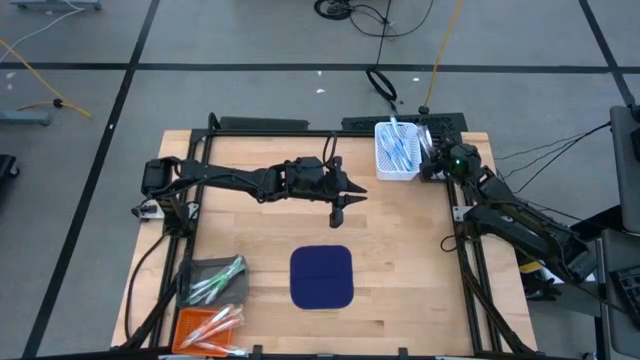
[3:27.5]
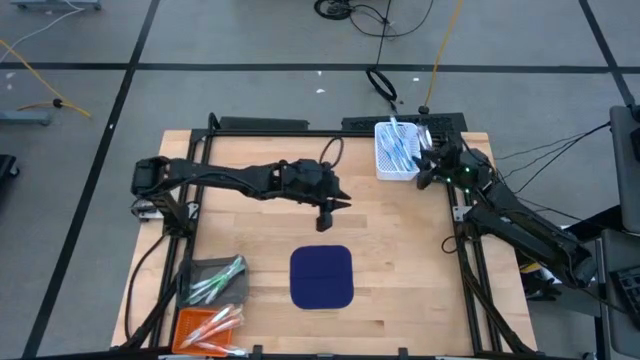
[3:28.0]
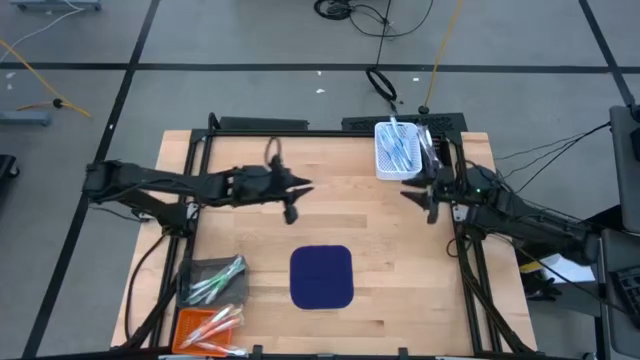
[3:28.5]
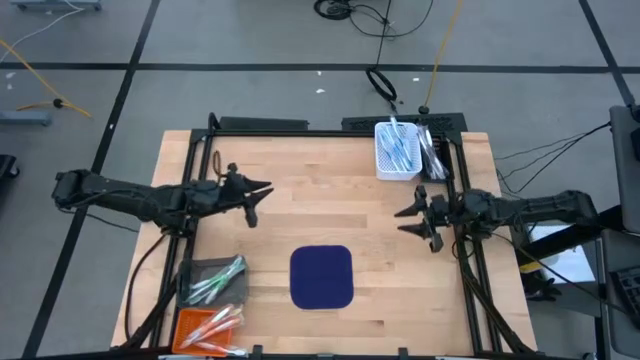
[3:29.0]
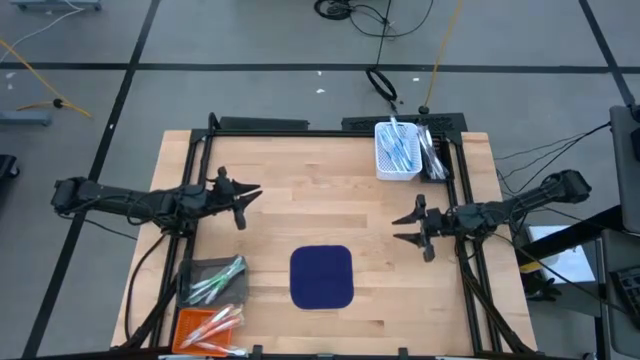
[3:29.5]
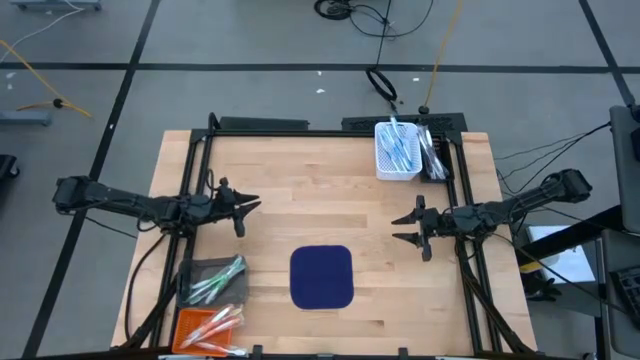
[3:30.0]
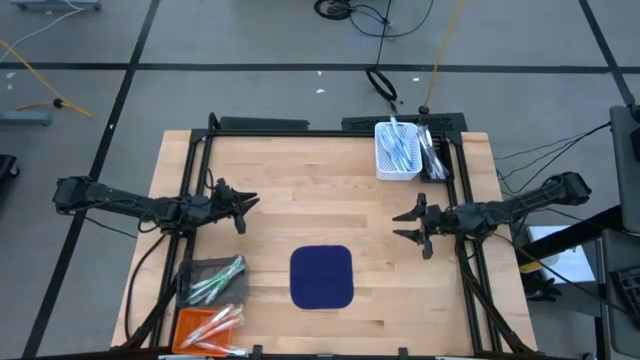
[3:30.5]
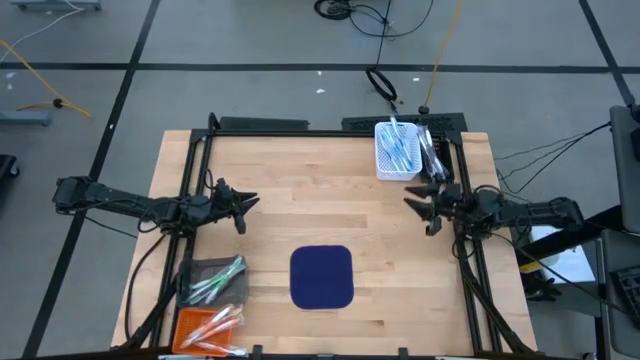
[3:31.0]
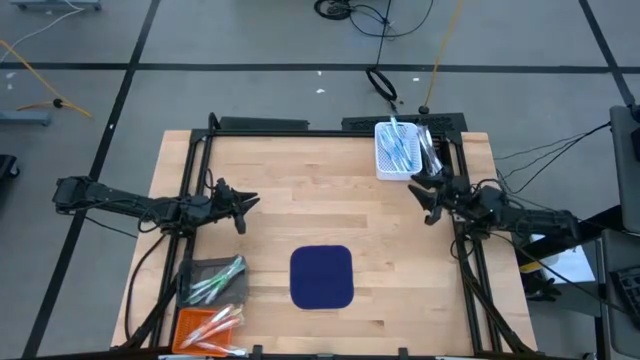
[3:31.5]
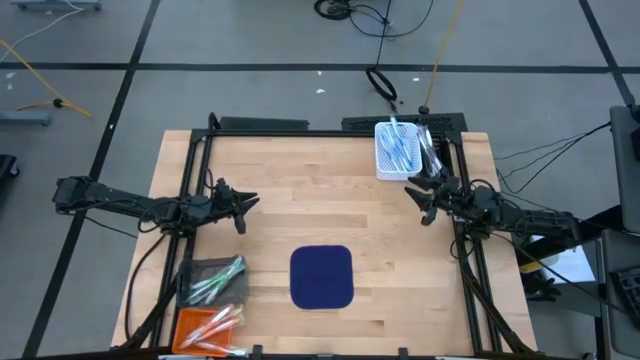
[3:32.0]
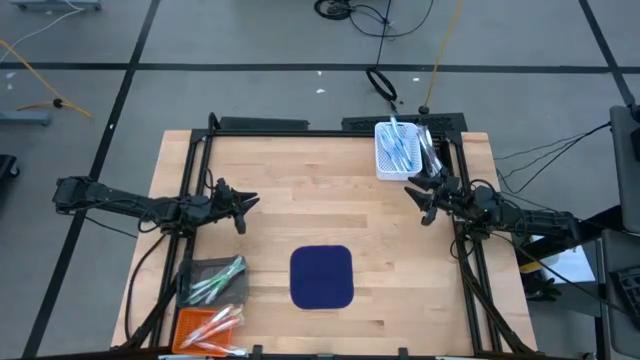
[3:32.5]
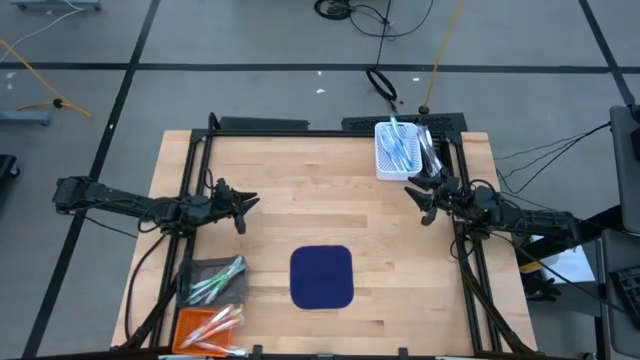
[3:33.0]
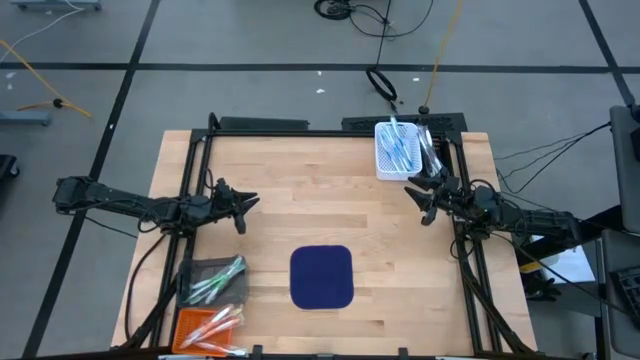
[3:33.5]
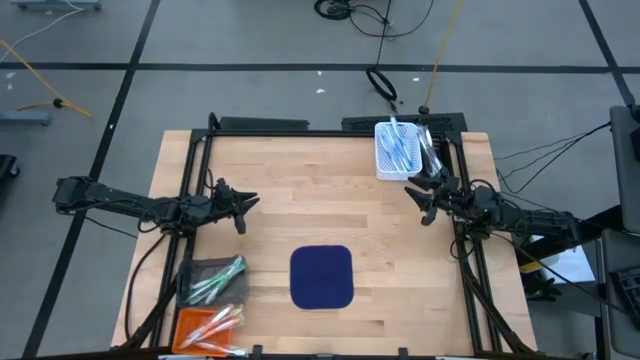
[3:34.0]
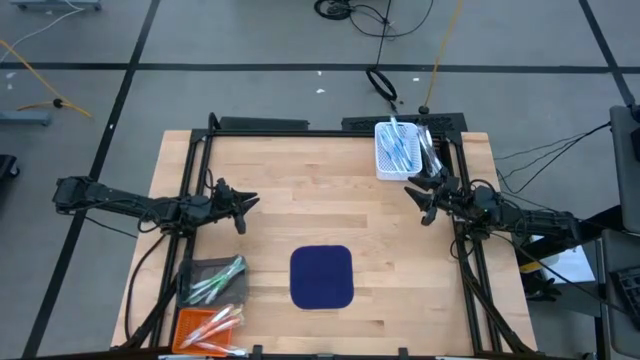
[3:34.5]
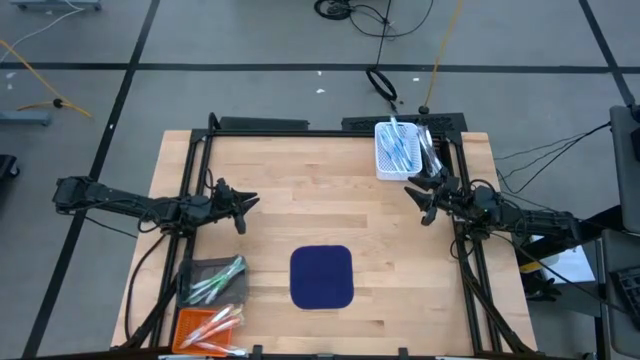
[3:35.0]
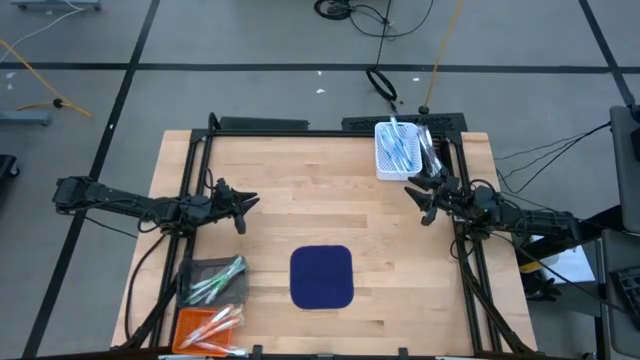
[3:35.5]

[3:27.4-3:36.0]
Task: Pick & Place Toothbrushes
Return to Home Position

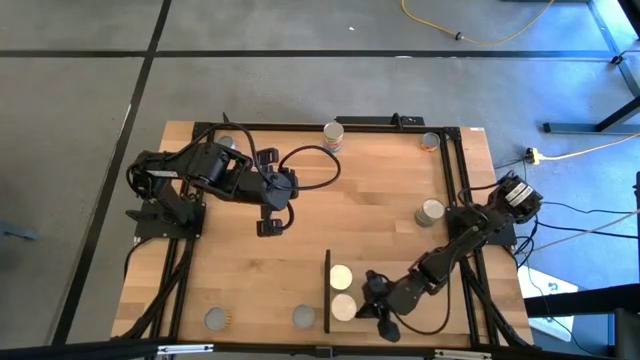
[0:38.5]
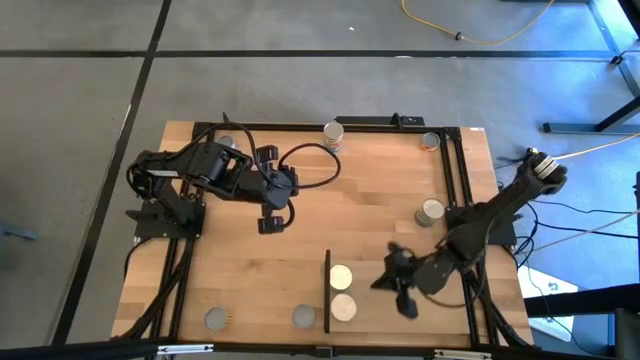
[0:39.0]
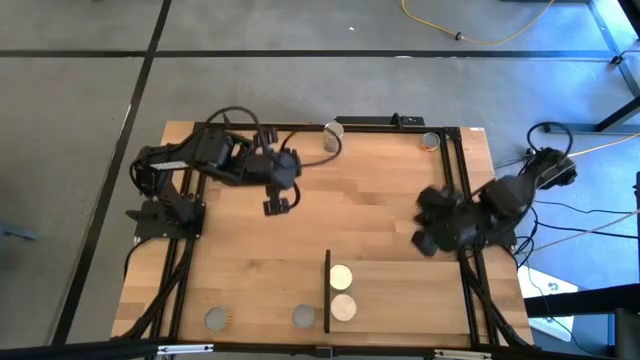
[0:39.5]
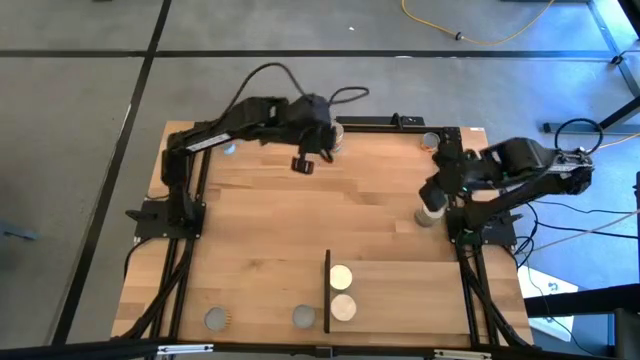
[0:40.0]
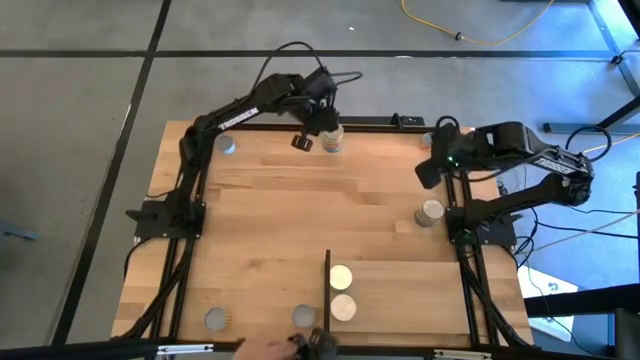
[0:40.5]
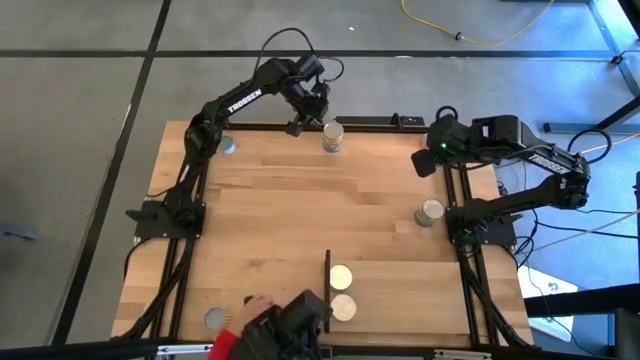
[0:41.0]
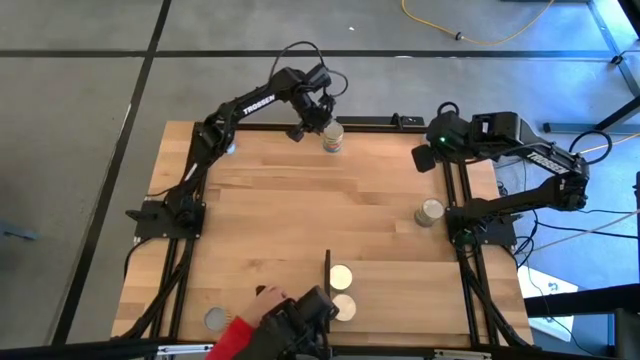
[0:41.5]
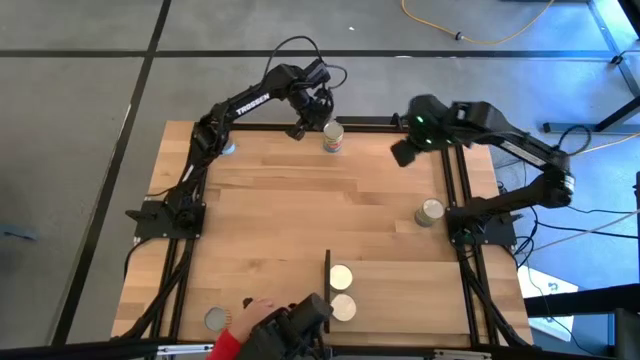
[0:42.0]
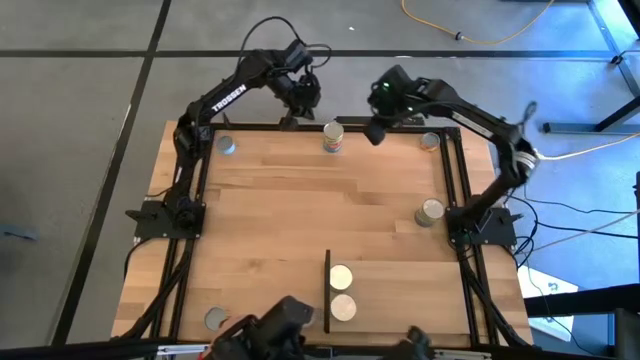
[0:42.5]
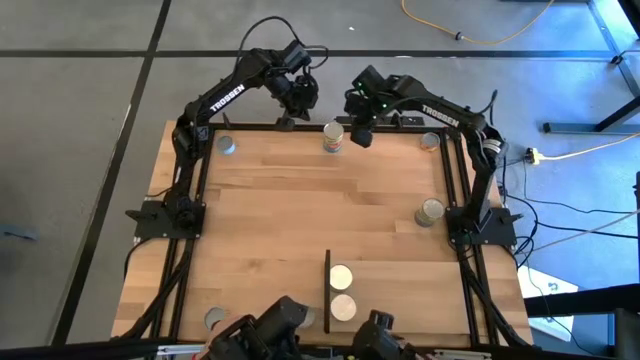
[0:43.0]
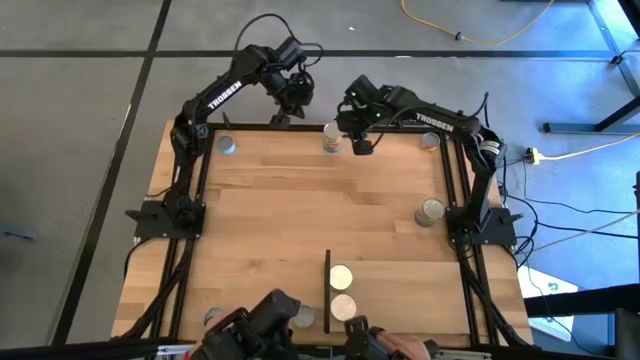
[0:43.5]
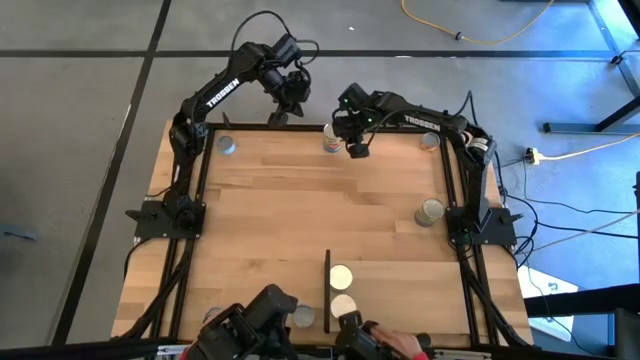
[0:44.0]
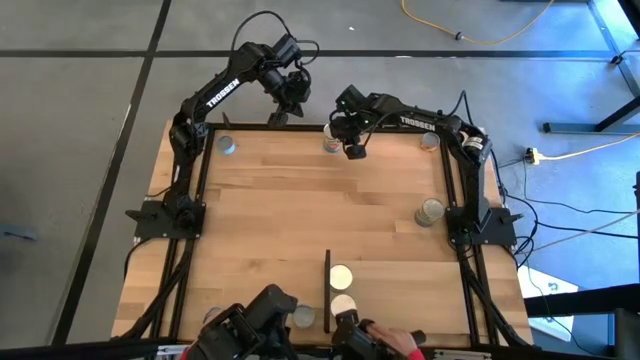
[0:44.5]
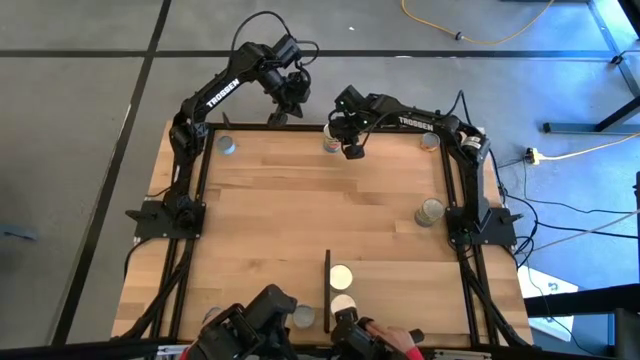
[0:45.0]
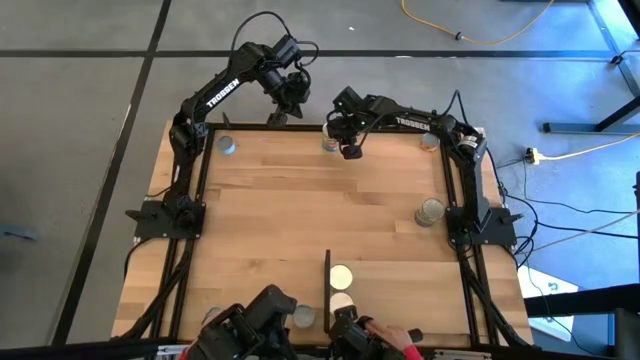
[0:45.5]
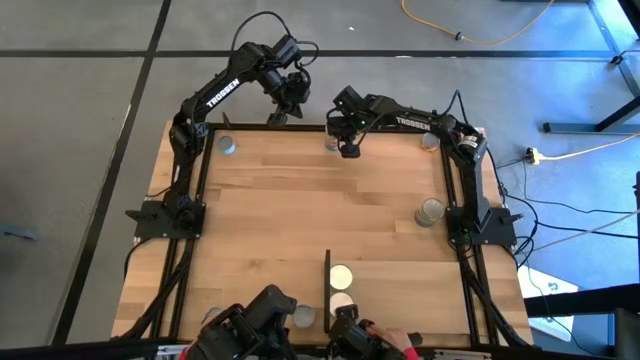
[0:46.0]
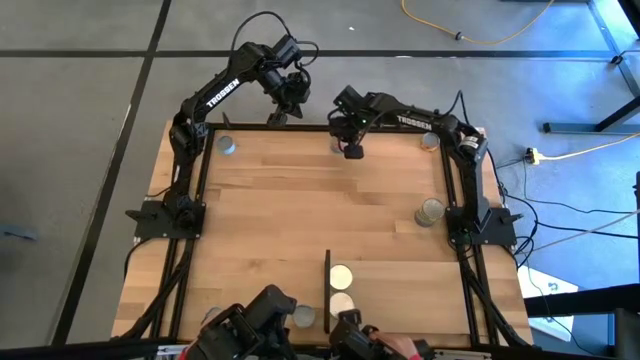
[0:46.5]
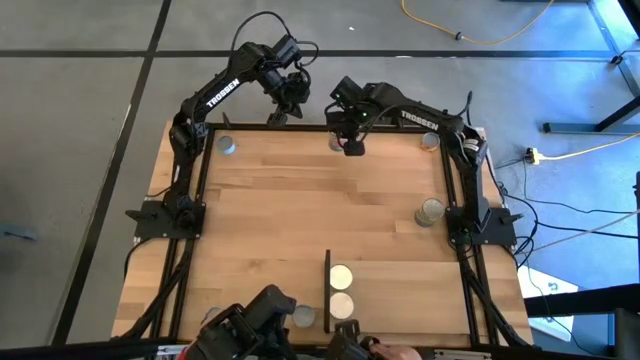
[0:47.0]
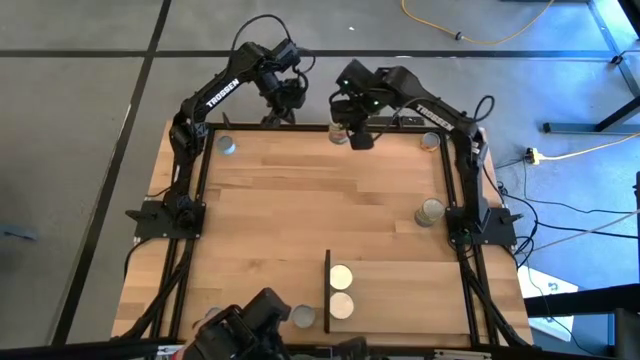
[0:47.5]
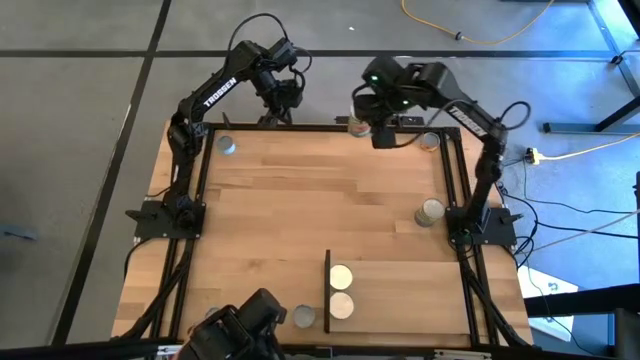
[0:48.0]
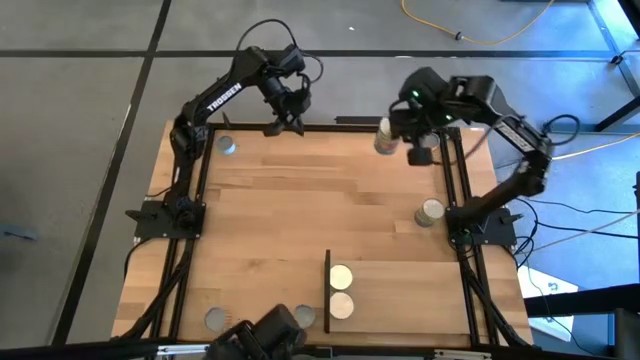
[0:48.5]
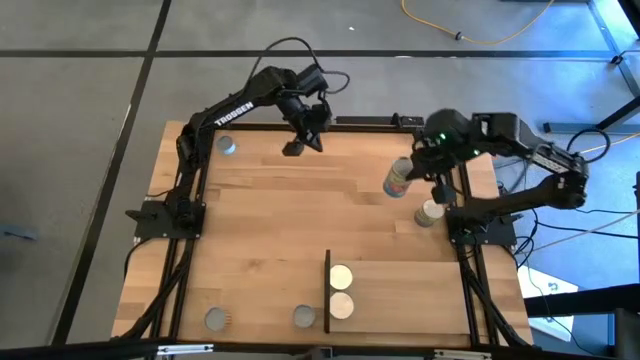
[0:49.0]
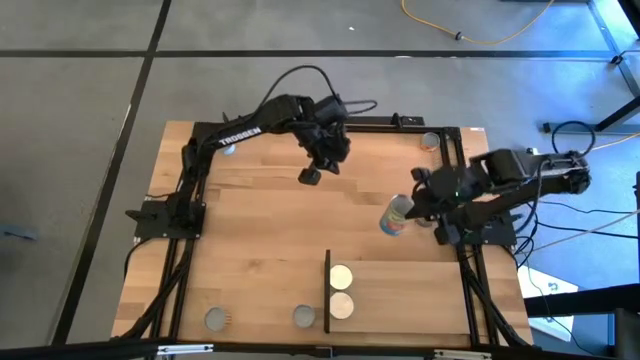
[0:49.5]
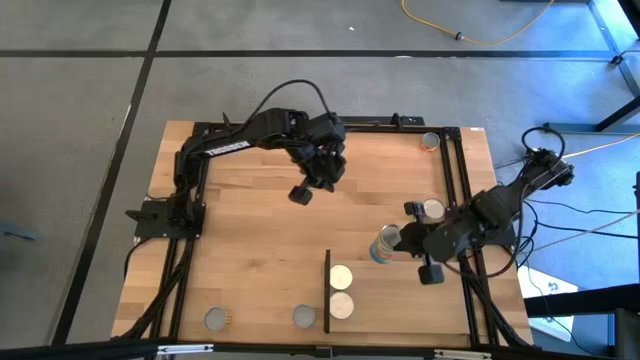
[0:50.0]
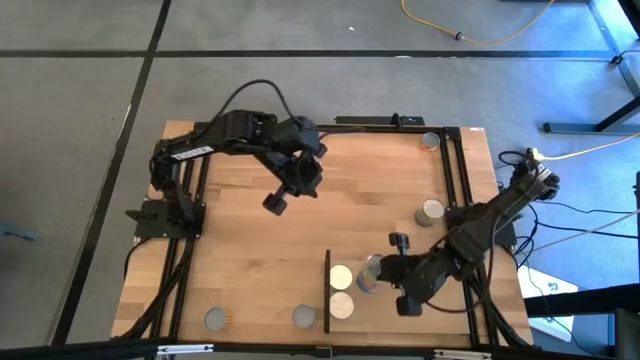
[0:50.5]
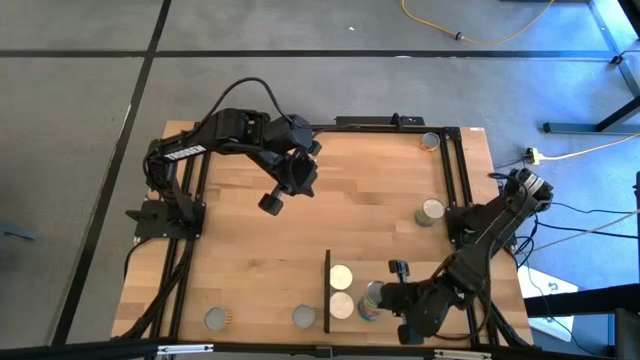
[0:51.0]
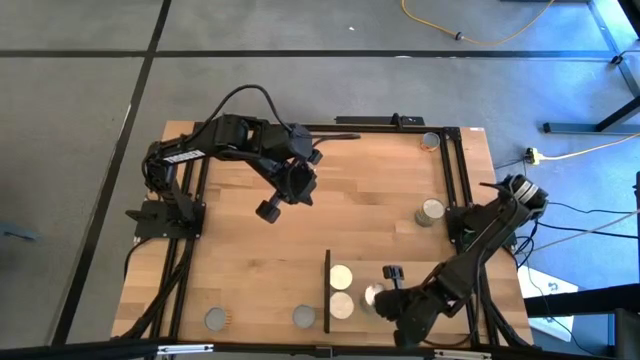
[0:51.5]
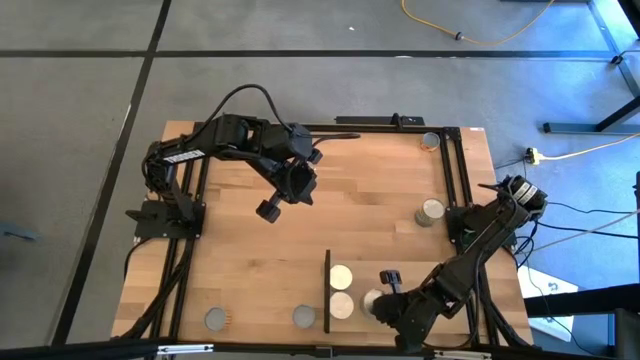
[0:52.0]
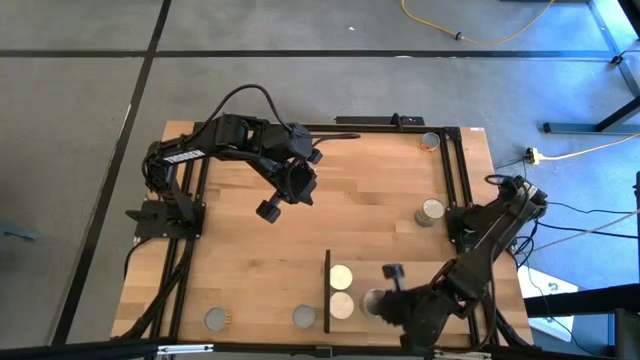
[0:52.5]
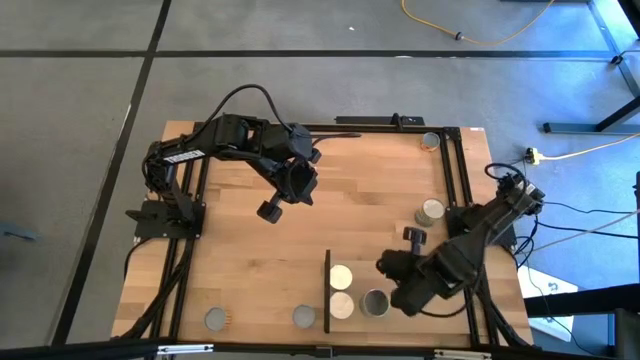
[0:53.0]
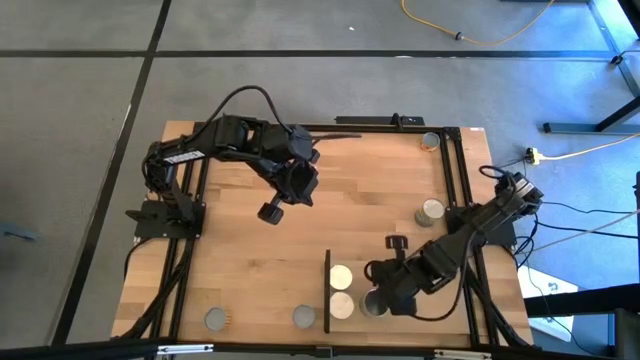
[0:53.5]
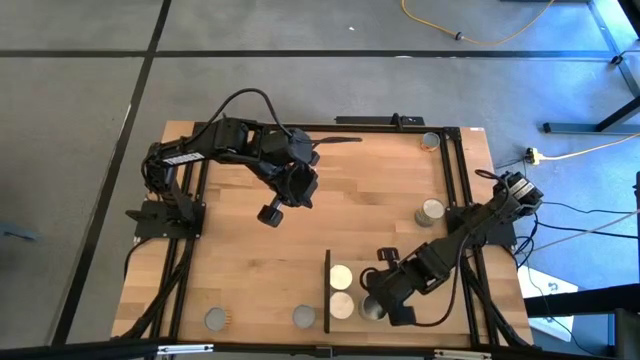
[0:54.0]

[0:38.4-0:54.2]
Task: Pick and place cans onto a shelf
Put the canned tomatoes on the shelf
